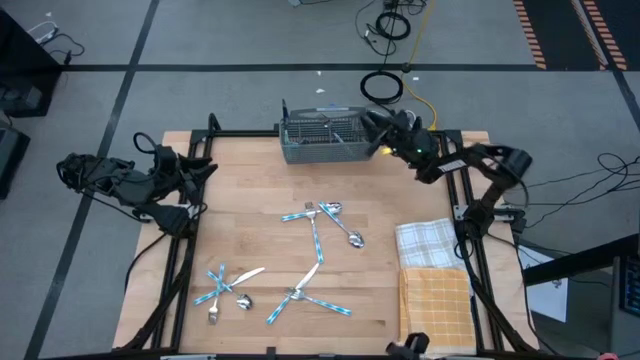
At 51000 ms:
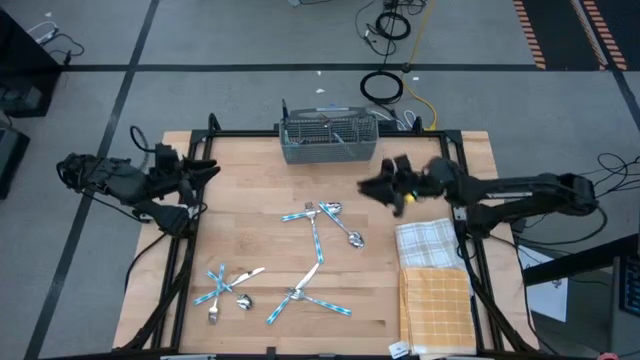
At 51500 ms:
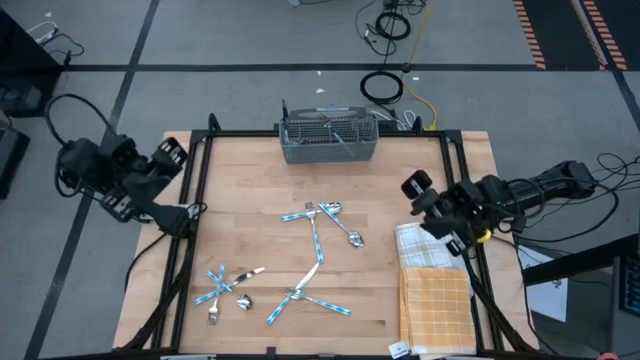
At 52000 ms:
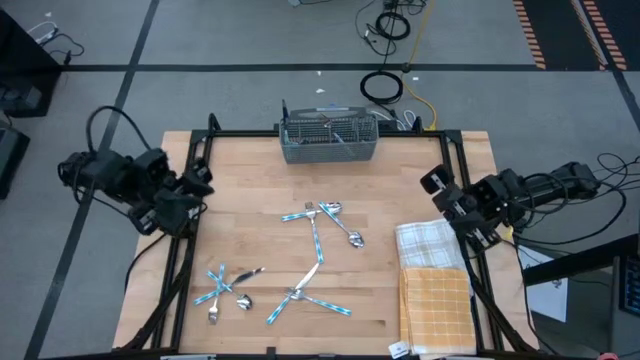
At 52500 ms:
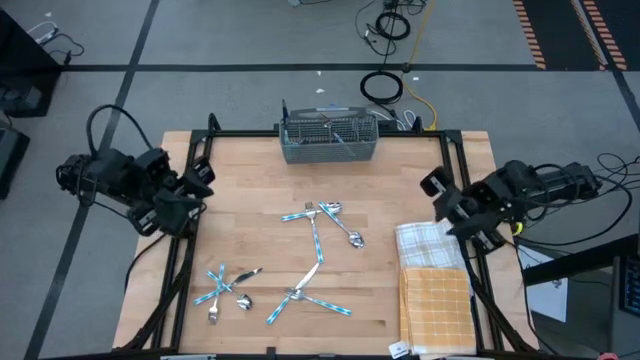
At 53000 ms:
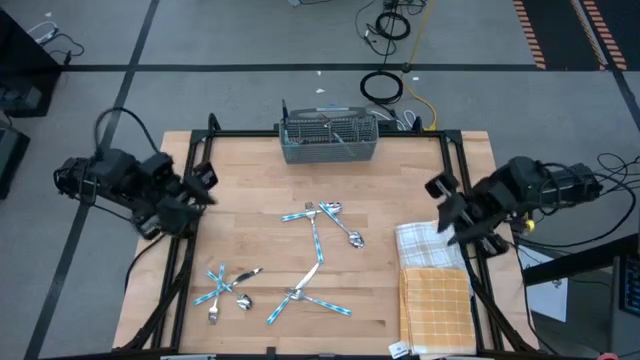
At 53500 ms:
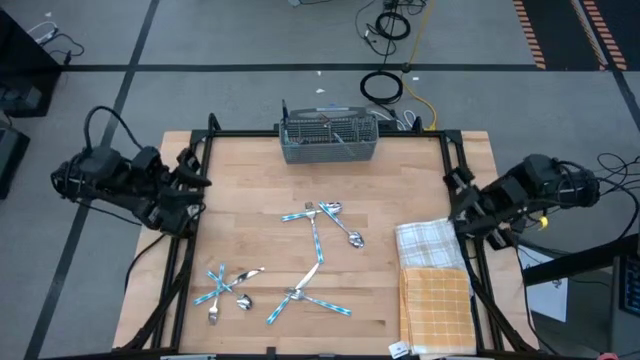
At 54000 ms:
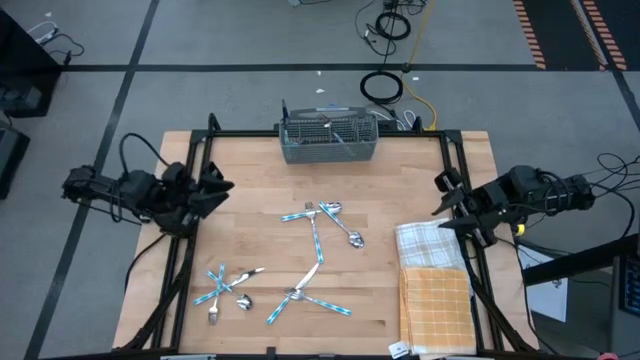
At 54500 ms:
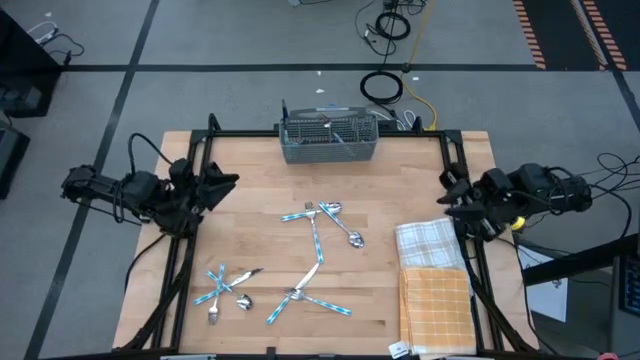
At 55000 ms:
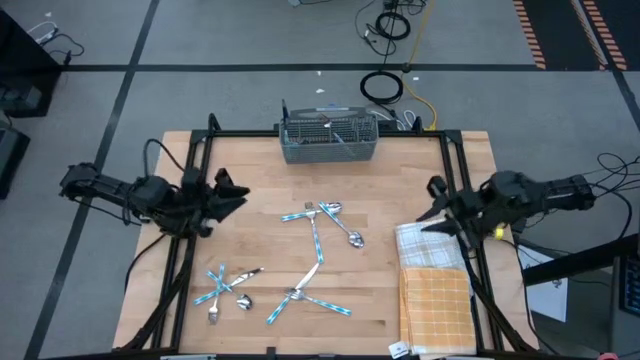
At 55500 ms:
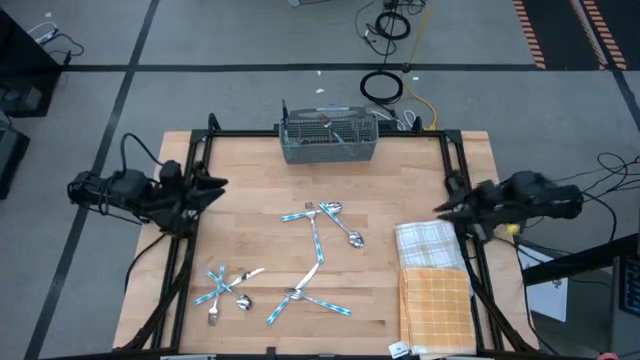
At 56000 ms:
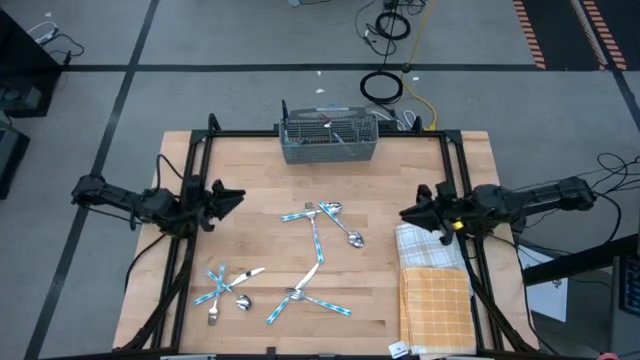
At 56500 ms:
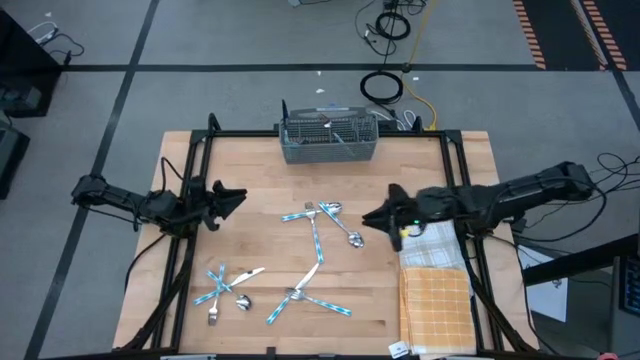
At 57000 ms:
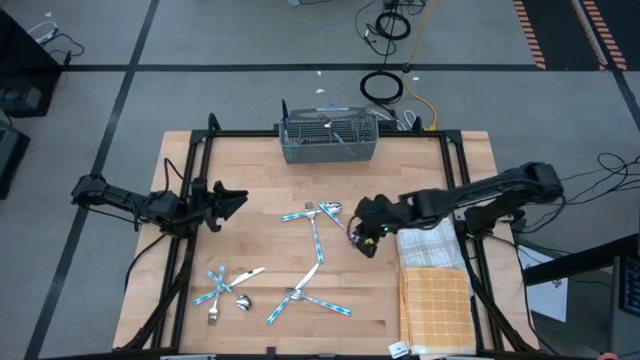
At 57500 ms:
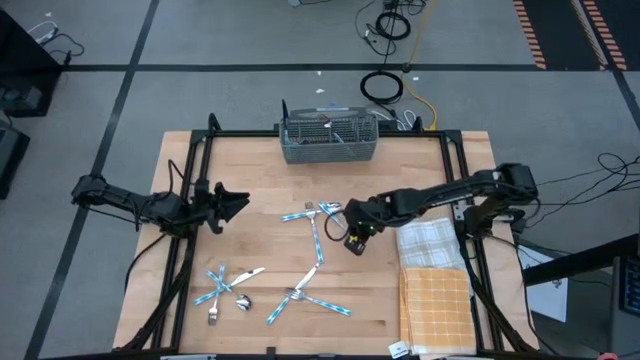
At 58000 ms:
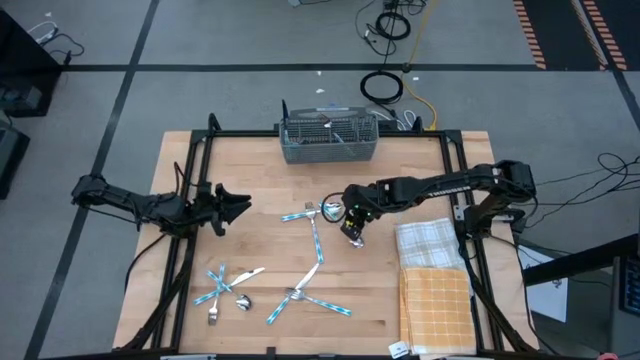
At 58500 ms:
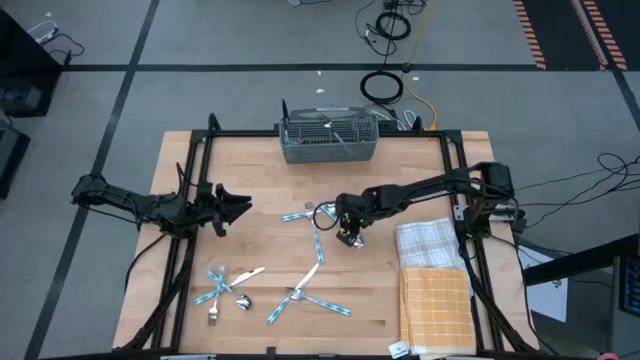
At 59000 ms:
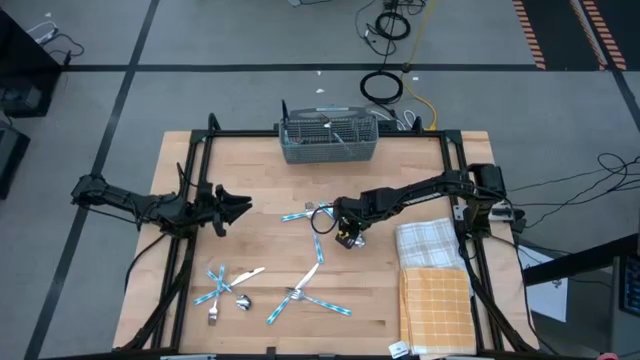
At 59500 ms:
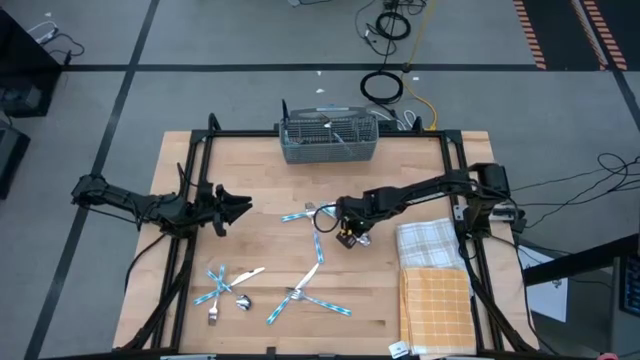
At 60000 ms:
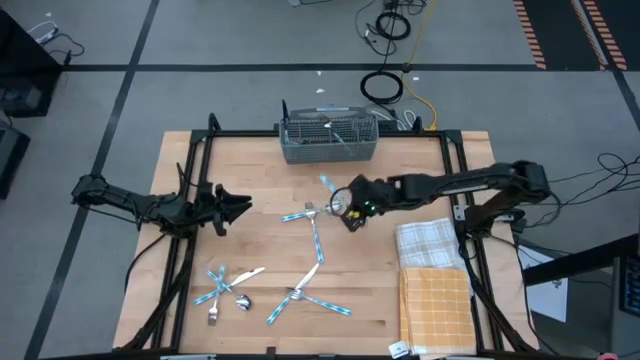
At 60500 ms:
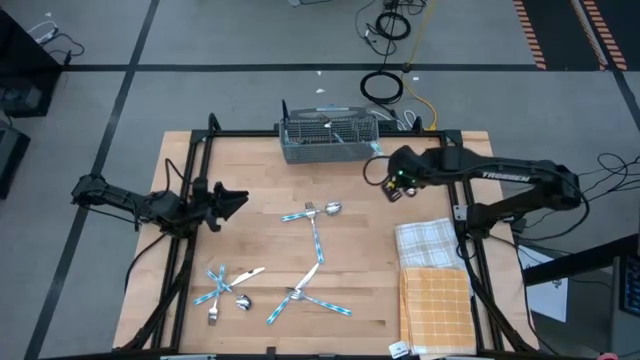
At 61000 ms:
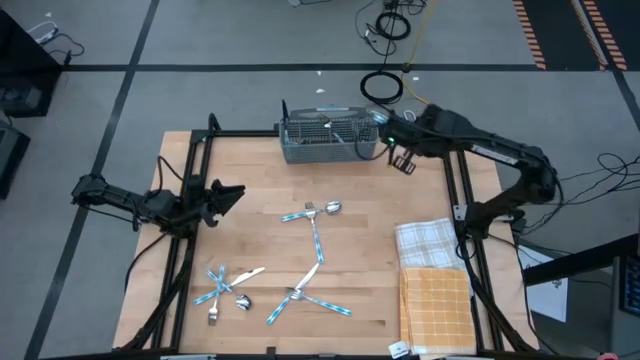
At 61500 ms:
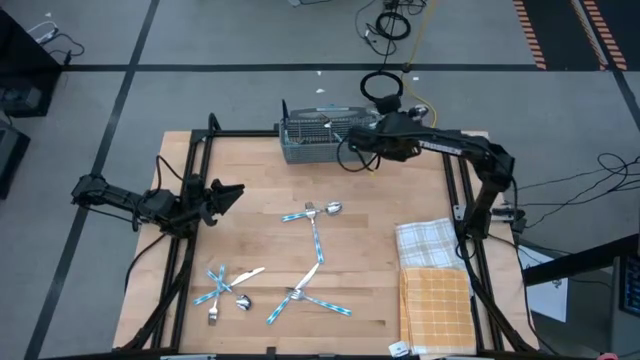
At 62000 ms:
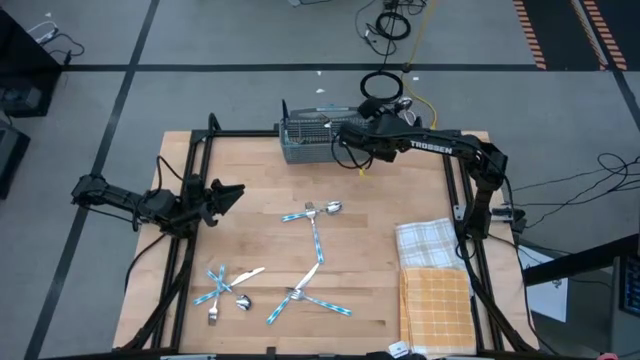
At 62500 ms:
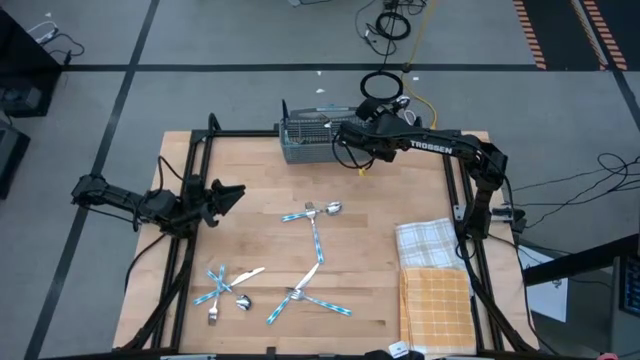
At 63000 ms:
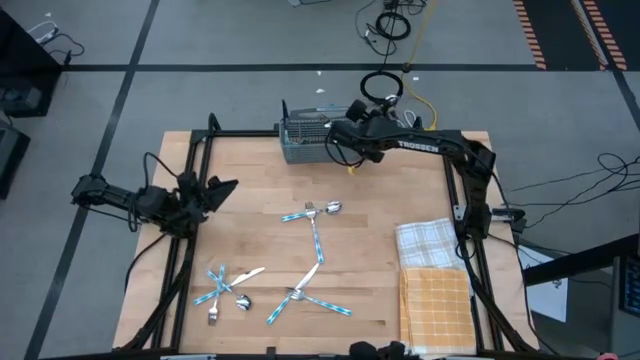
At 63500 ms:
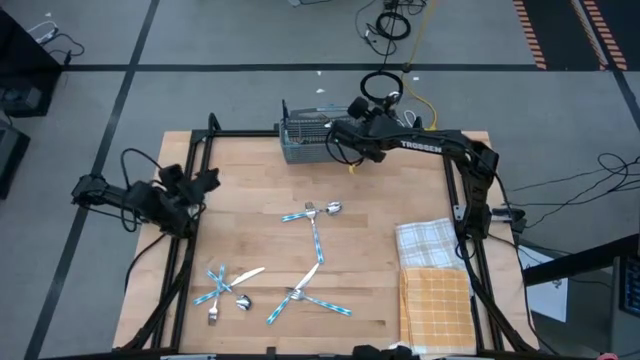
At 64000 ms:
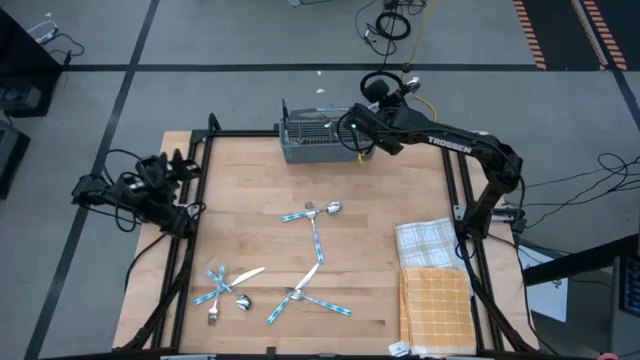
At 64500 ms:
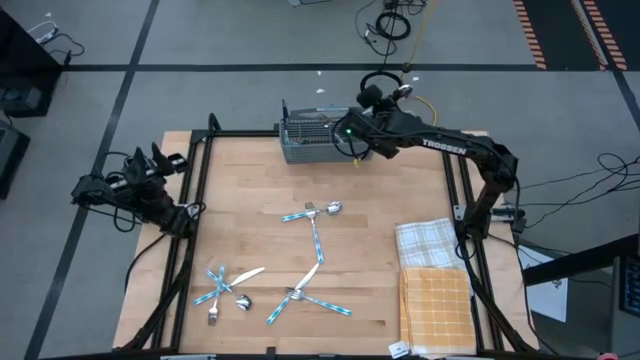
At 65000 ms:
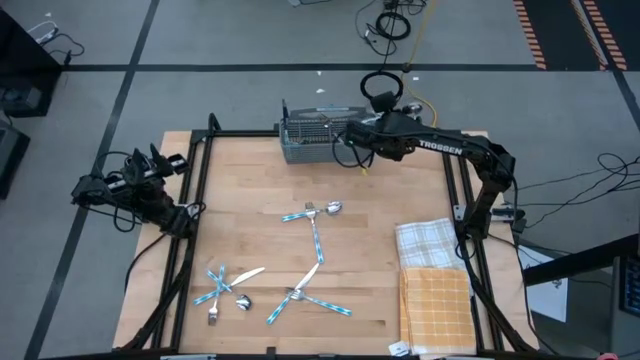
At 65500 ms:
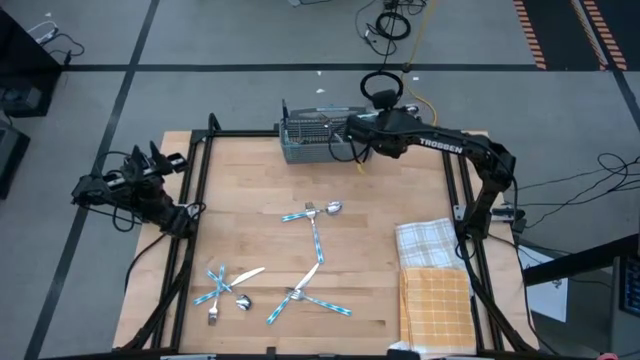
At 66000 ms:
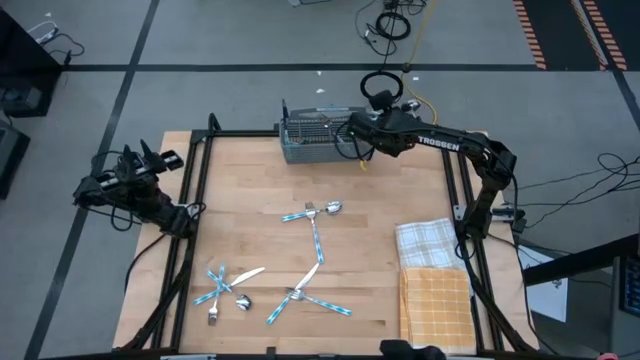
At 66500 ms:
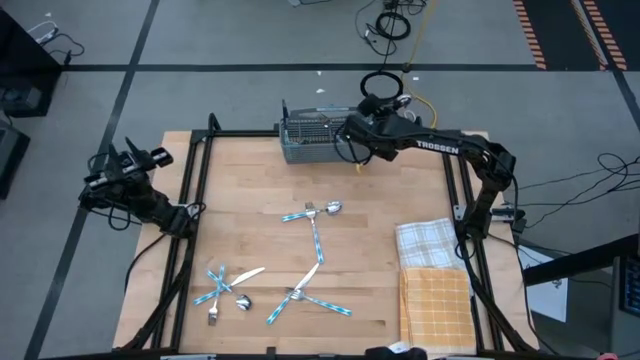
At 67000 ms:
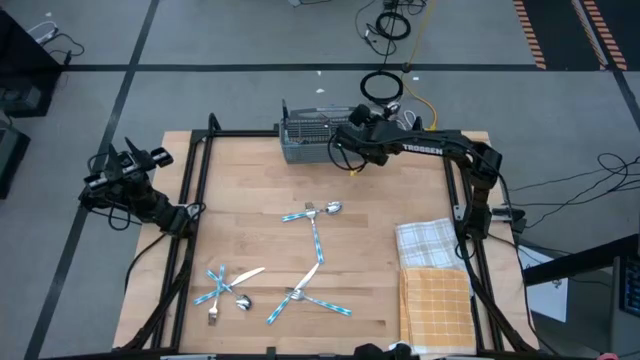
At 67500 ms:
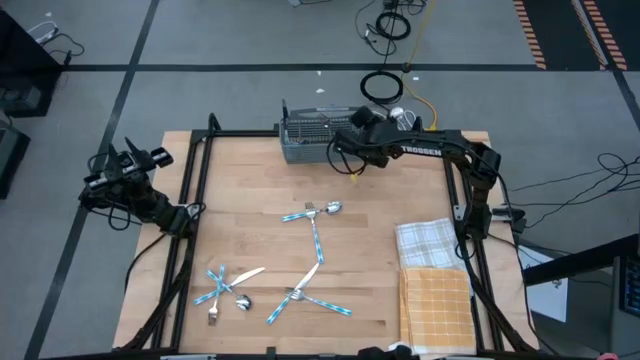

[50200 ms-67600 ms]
Task: Sort silverware
Put the spoon into the silverware rack
